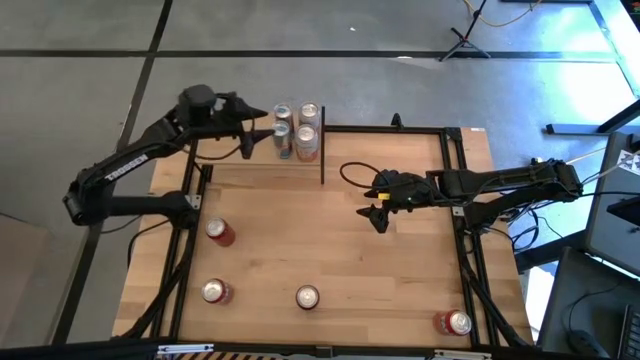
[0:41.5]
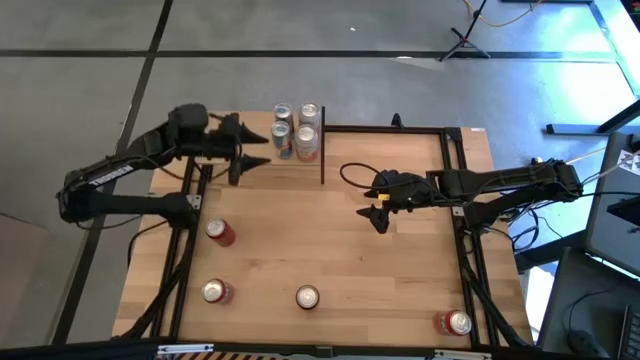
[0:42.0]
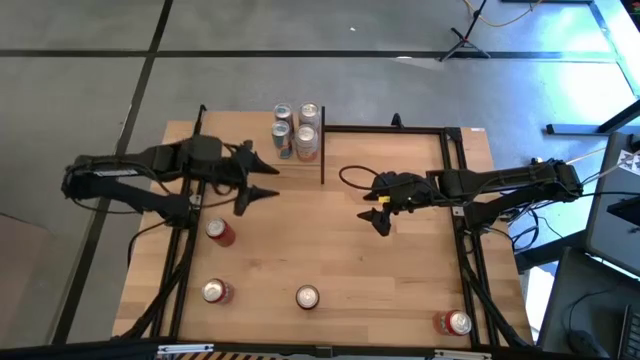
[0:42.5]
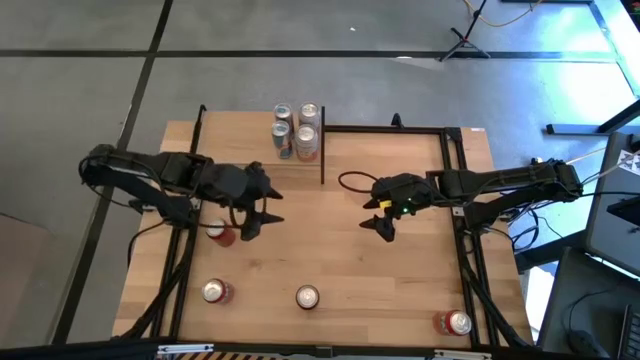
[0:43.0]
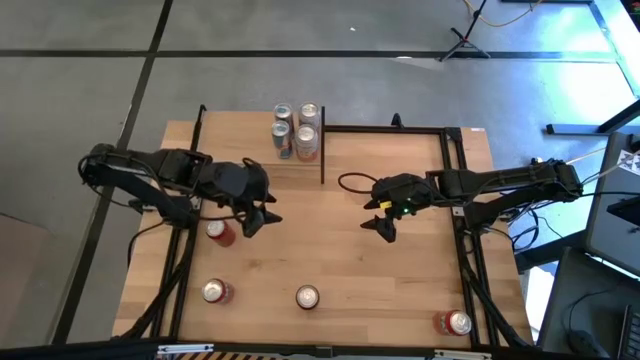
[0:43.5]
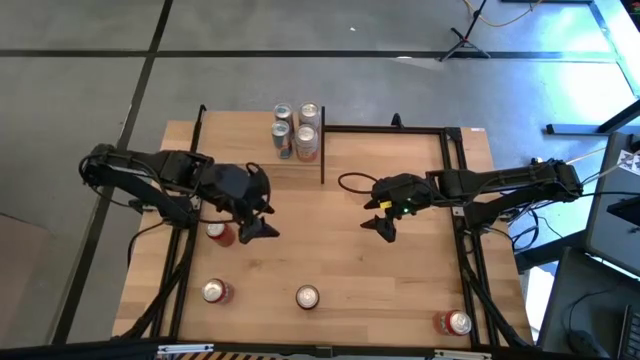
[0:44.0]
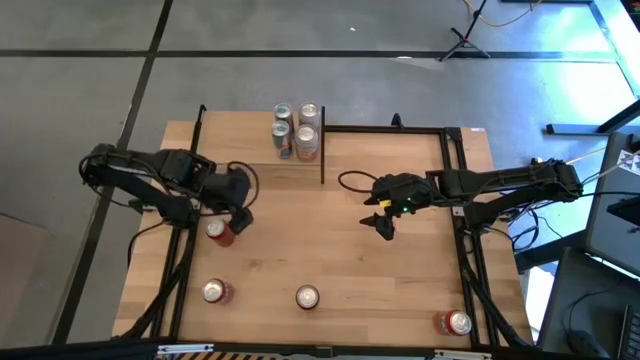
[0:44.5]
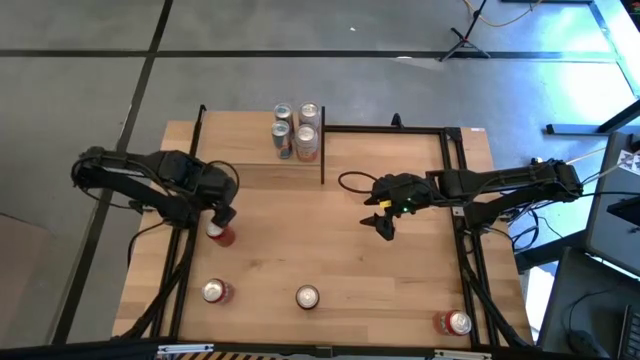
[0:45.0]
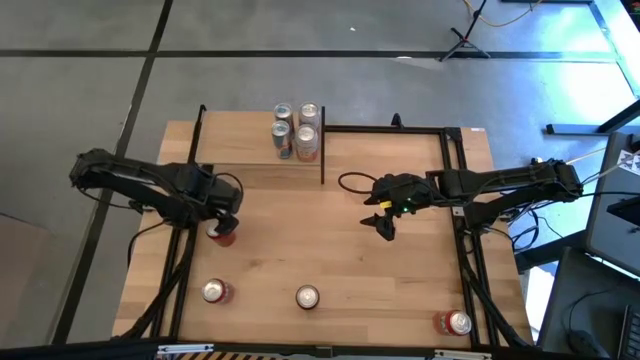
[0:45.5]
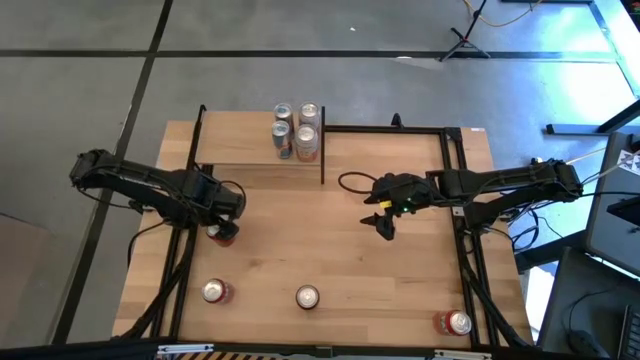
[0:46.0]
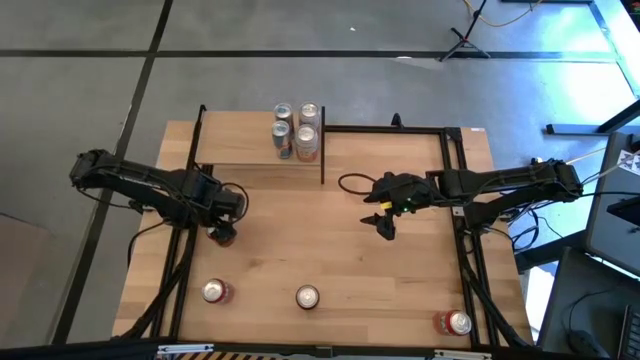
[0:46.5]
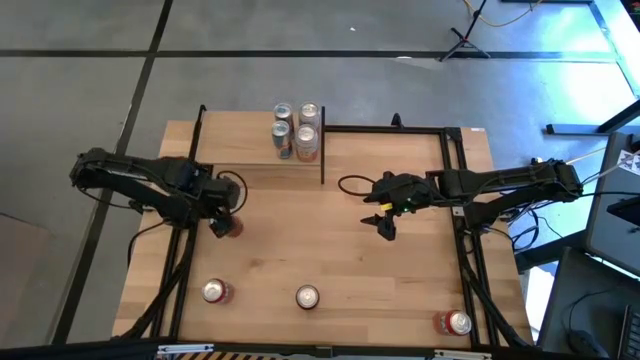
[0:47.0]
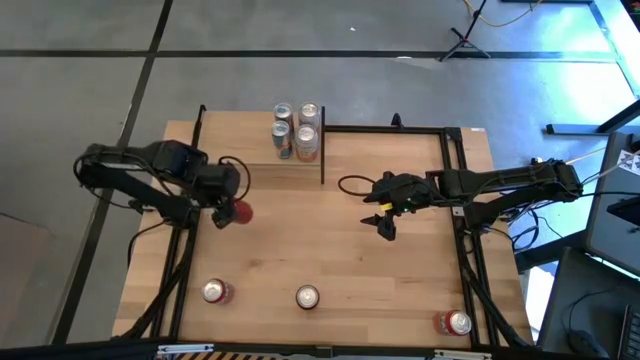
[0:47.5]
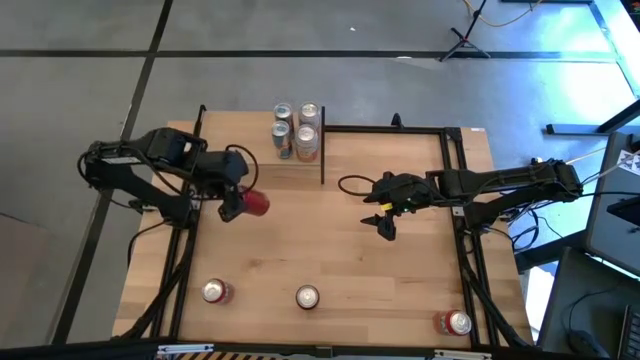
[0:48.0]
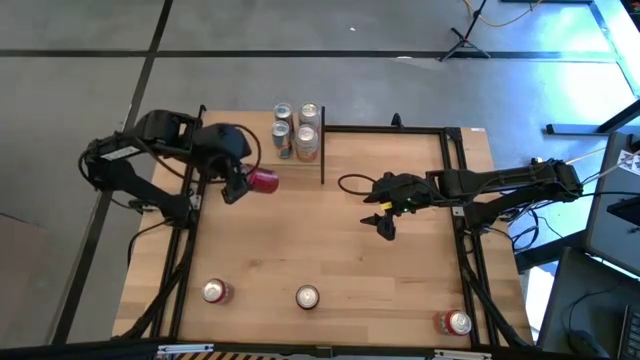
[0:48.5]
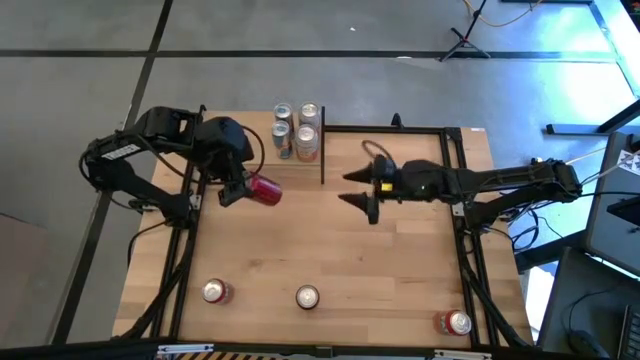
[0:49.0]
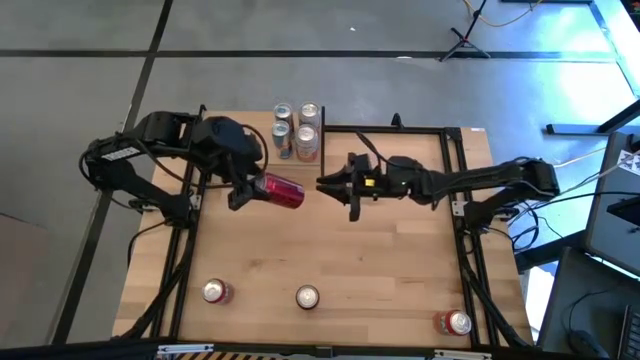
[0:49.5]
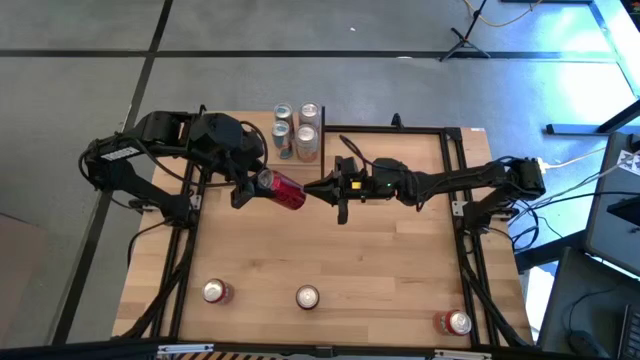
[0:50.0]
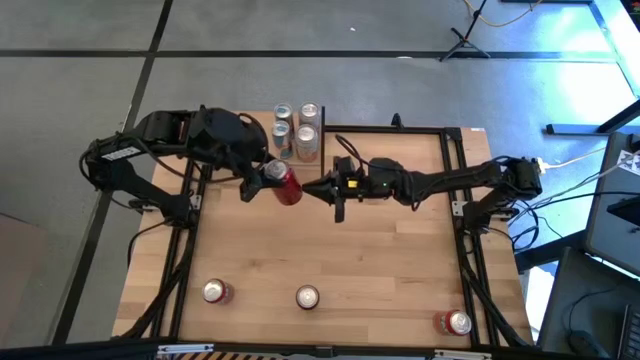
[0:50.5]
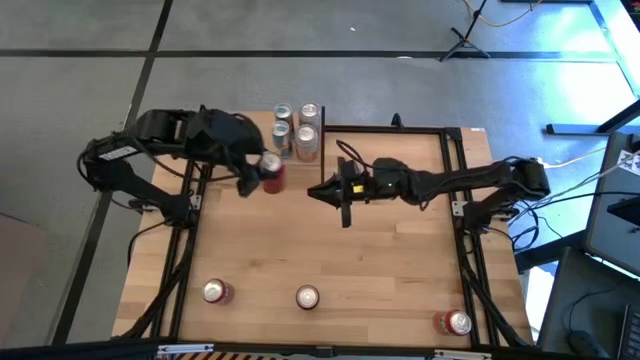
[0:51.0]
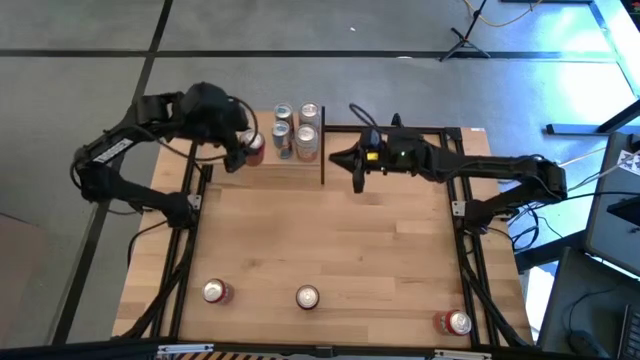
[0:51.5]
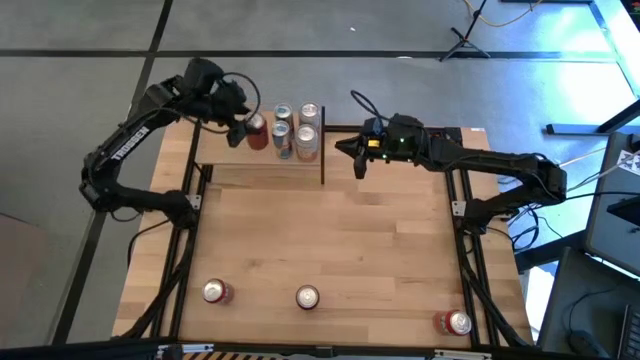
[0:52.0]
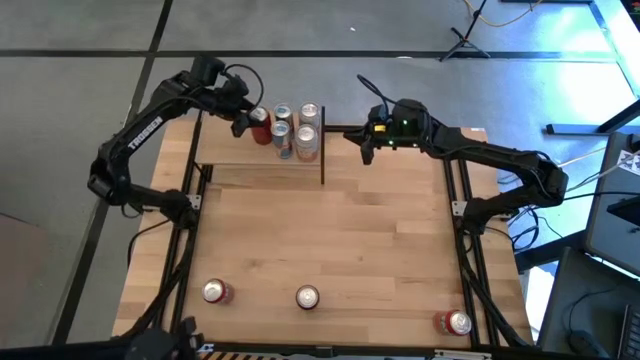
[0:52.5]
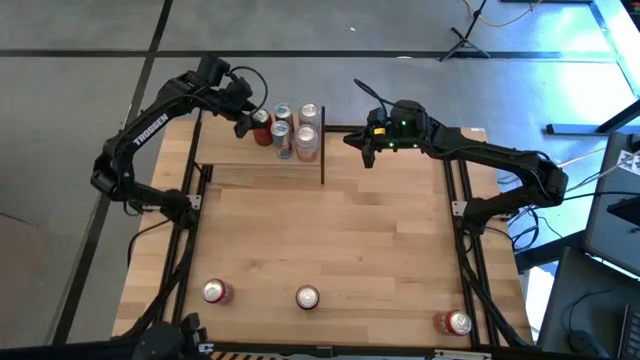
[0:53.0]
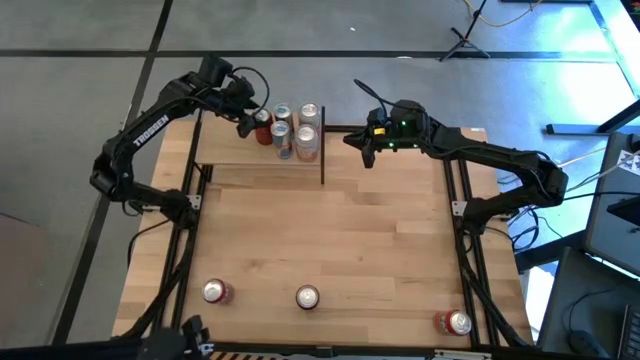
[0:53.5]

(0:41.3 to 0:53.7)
Task: Place canned beverage on shelf
Put the top red soda can on the shelf

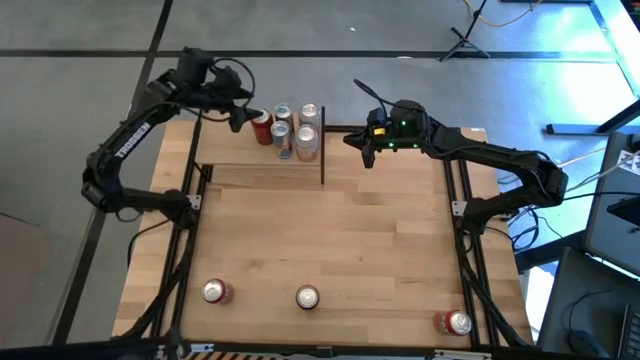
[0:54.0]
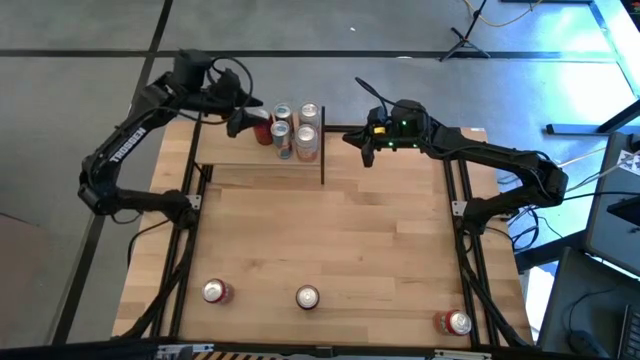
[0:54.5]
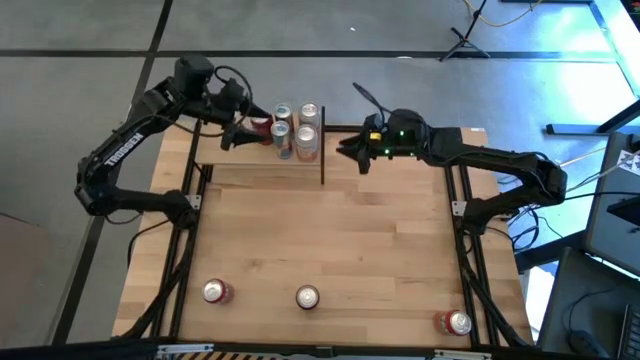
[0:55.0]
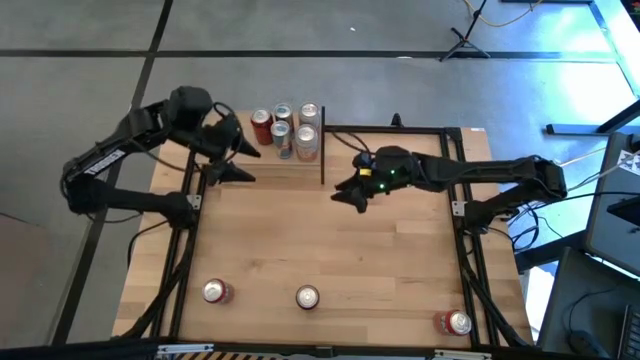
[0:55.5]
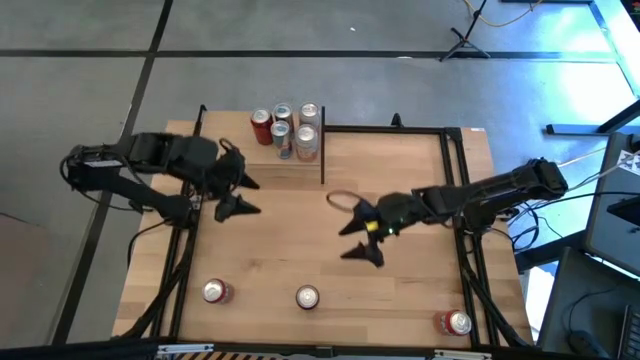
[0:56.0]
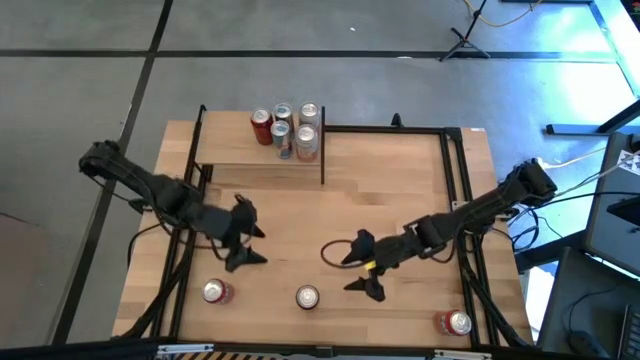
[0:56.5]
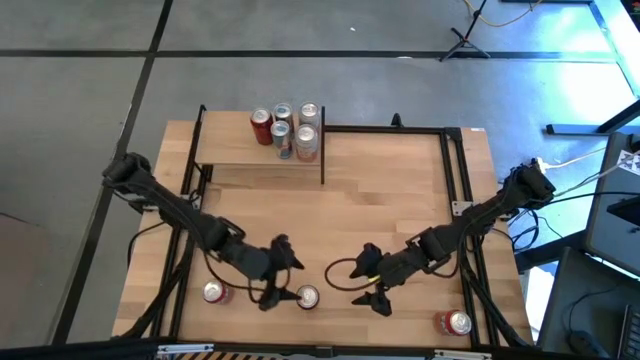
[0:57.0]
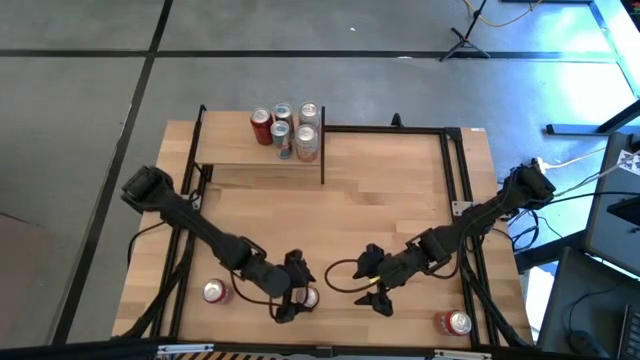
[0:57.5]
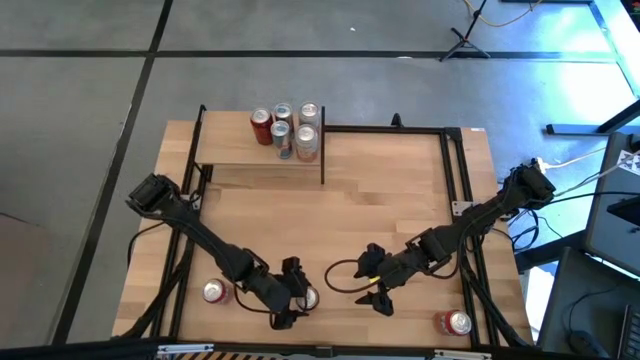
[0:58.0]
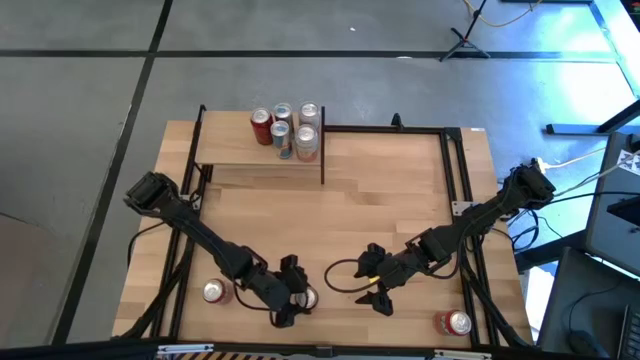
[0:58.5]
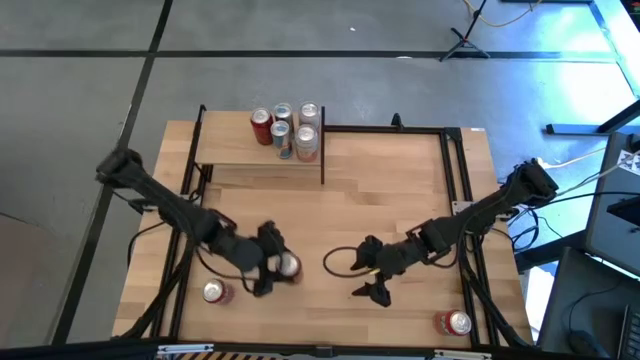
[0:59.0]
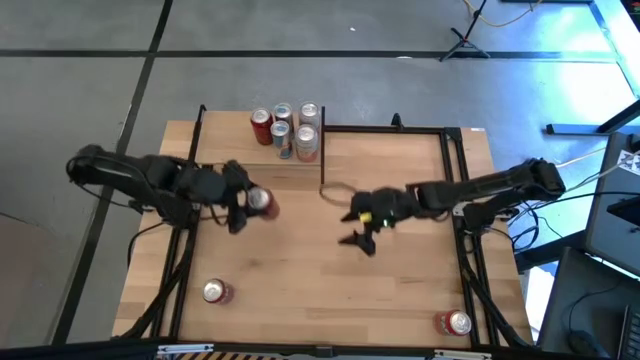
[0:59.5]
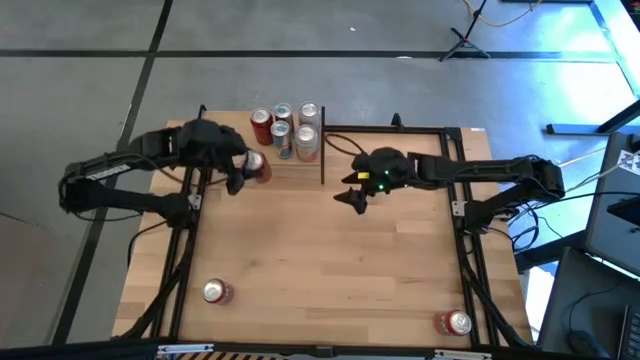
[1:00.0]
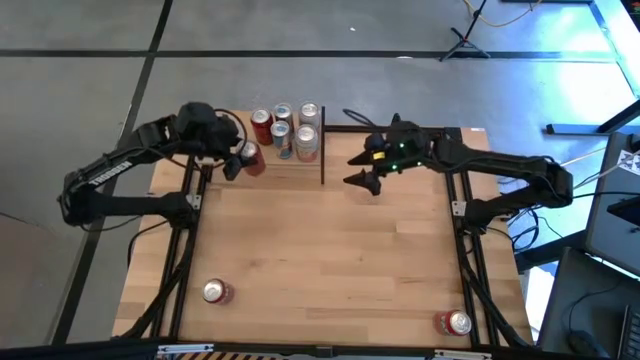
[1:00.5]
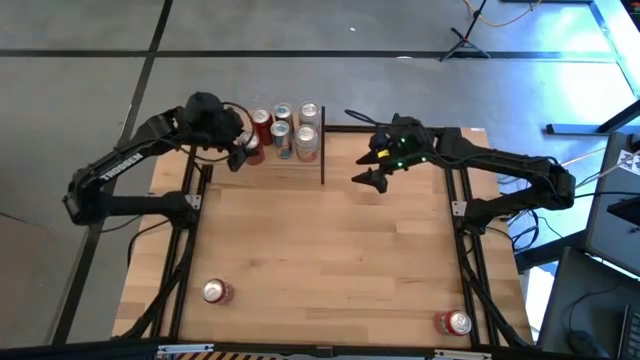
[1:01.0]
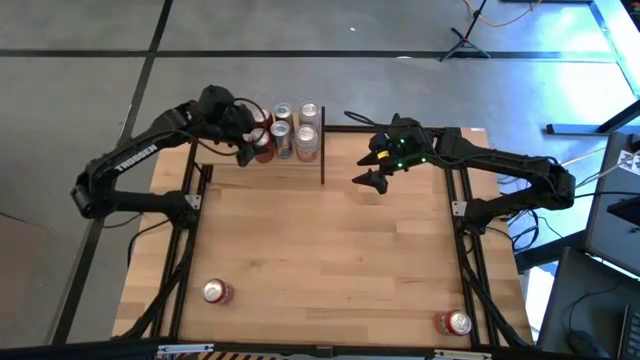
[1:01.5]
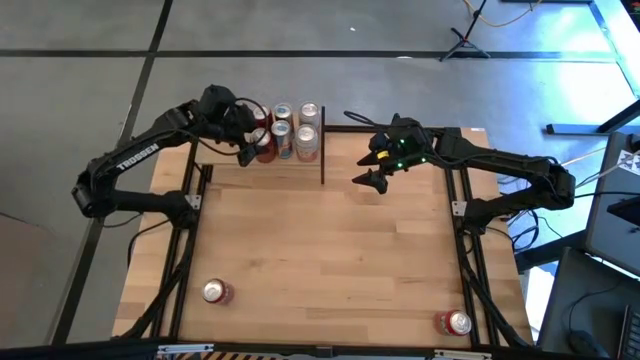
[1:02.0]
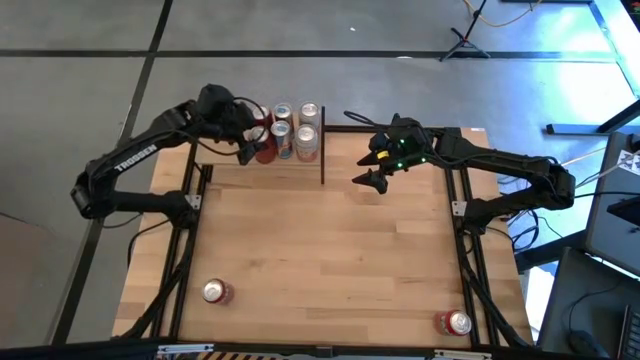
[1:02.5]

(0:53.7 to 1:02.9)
Put the red soda can on the shelf aligned with the other red soda can
